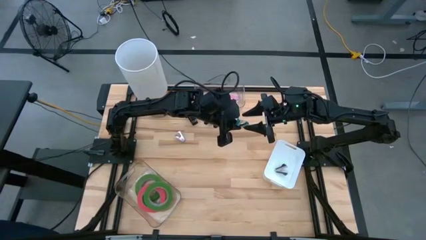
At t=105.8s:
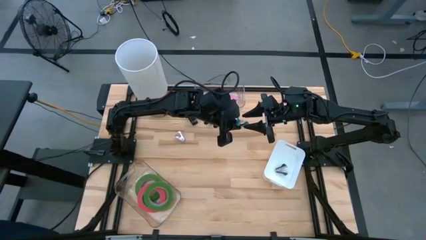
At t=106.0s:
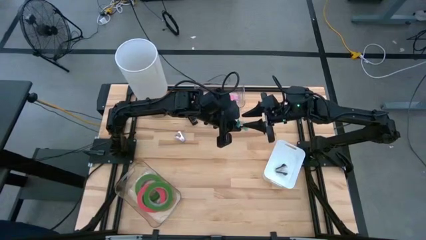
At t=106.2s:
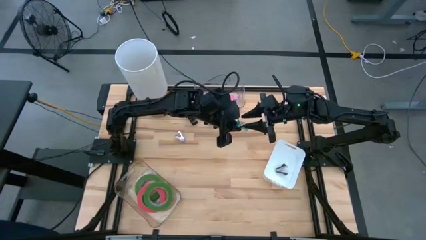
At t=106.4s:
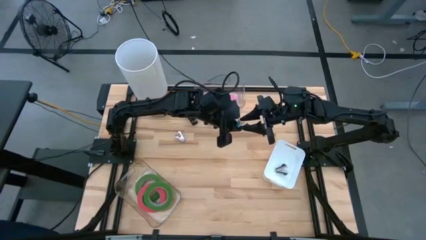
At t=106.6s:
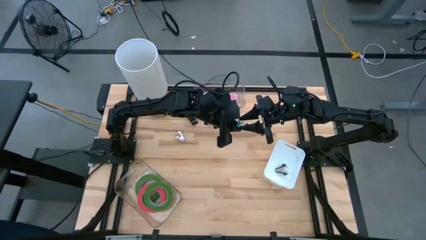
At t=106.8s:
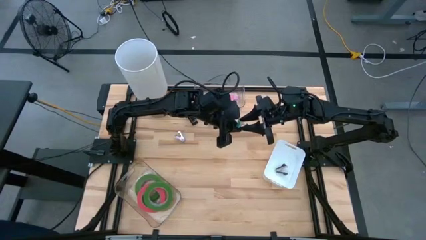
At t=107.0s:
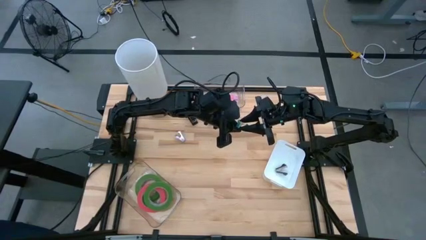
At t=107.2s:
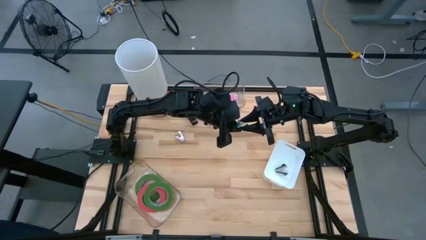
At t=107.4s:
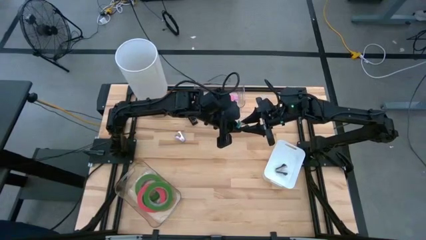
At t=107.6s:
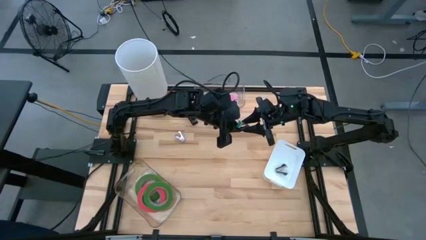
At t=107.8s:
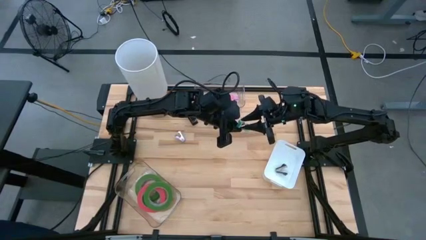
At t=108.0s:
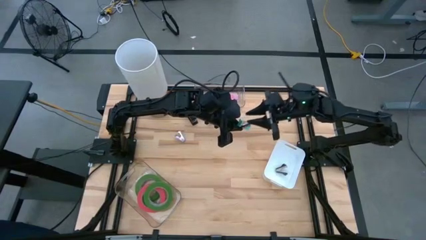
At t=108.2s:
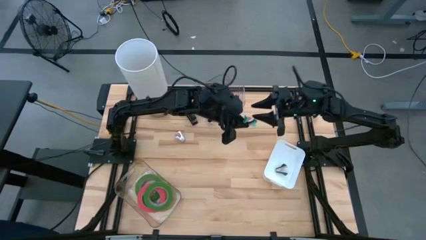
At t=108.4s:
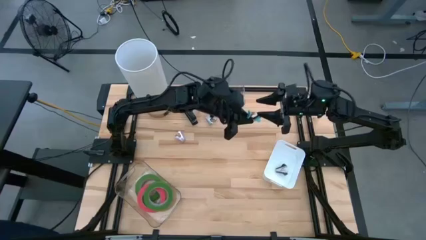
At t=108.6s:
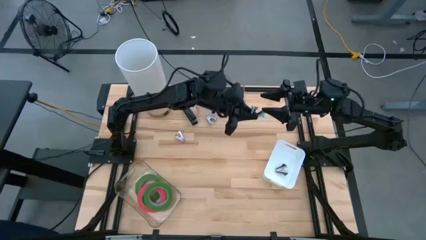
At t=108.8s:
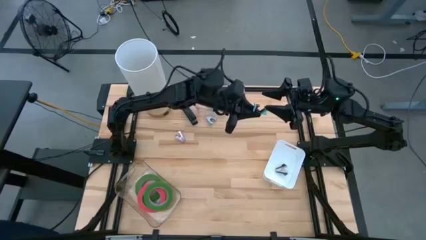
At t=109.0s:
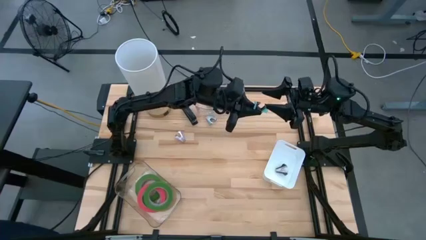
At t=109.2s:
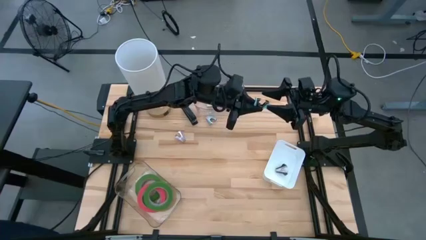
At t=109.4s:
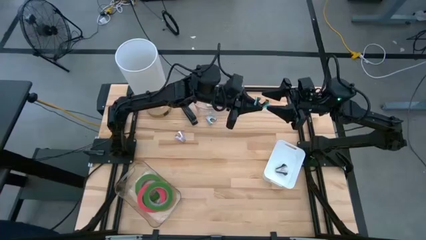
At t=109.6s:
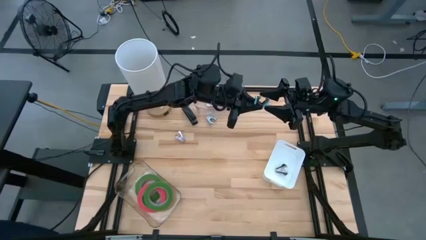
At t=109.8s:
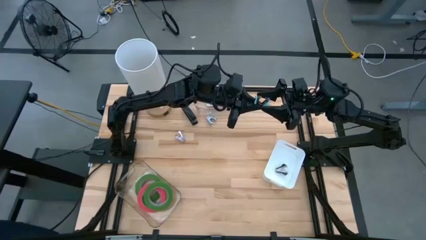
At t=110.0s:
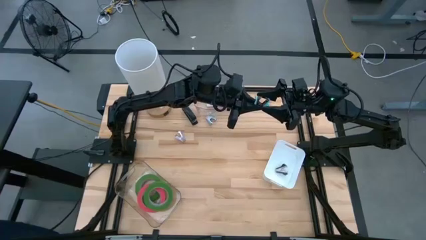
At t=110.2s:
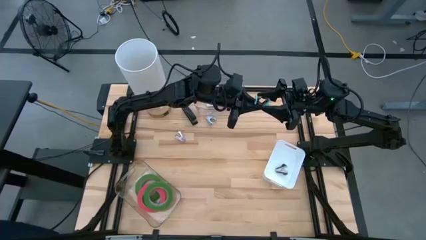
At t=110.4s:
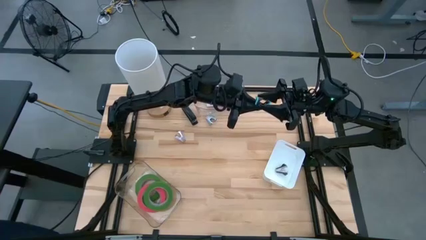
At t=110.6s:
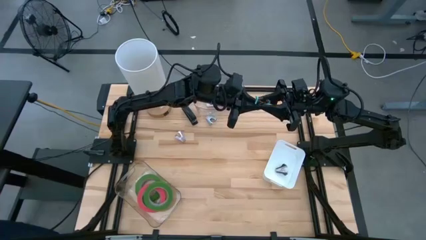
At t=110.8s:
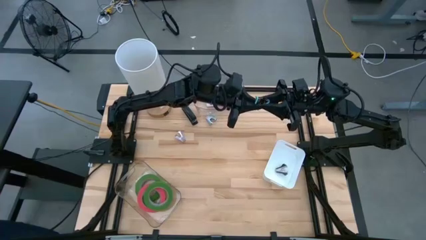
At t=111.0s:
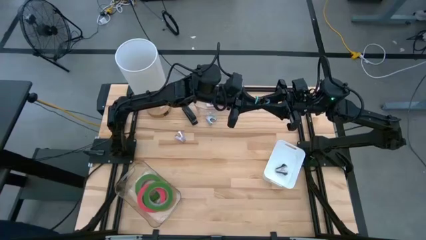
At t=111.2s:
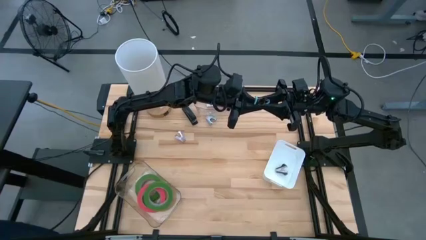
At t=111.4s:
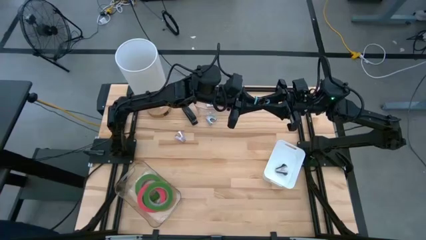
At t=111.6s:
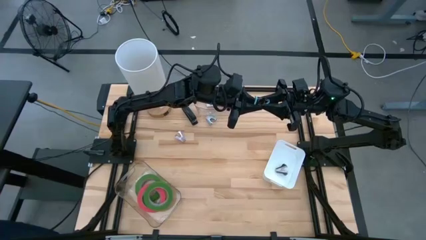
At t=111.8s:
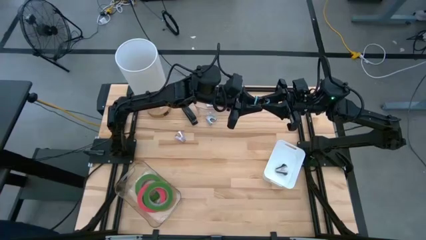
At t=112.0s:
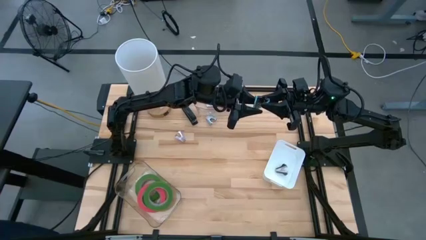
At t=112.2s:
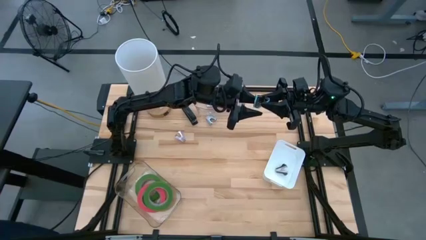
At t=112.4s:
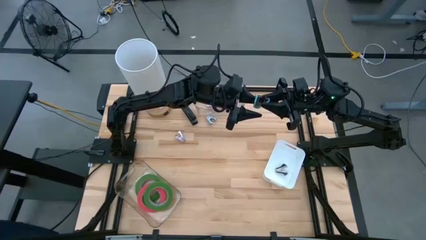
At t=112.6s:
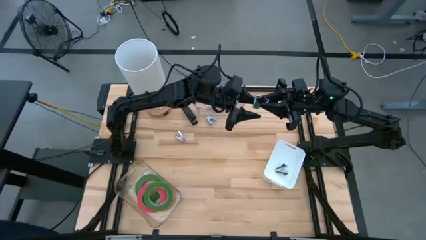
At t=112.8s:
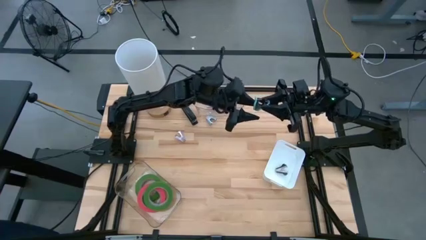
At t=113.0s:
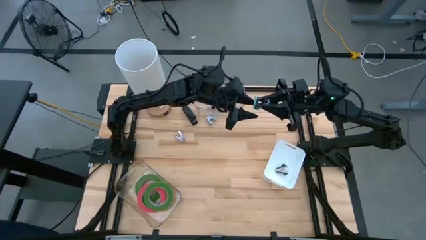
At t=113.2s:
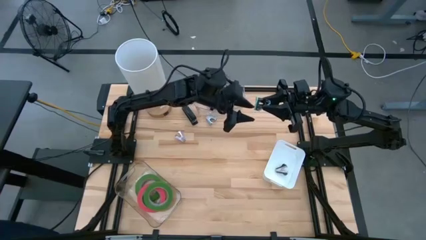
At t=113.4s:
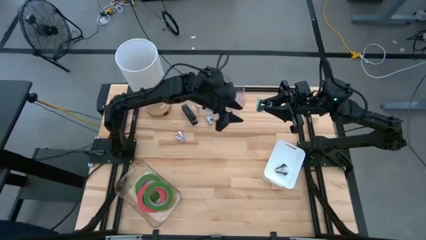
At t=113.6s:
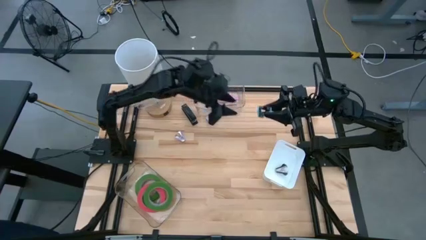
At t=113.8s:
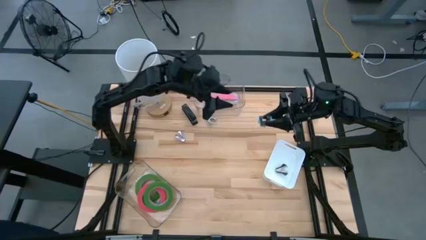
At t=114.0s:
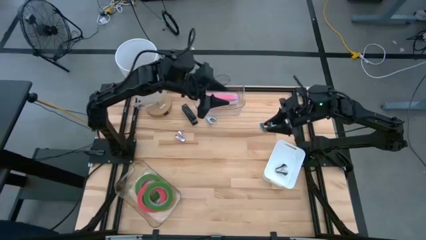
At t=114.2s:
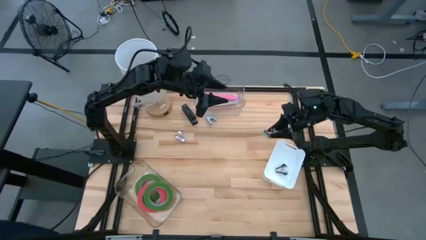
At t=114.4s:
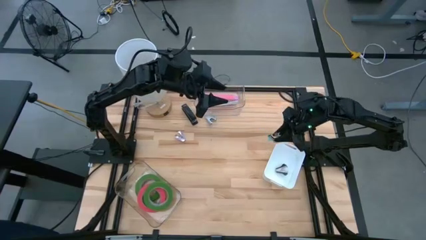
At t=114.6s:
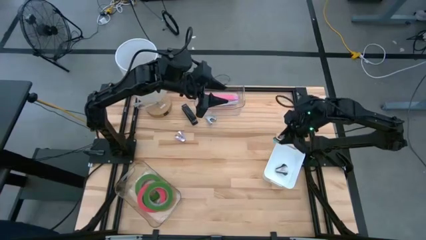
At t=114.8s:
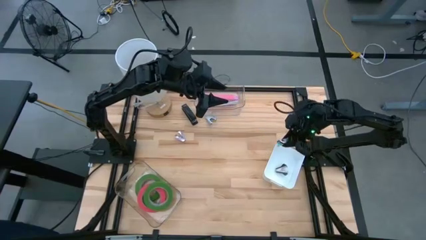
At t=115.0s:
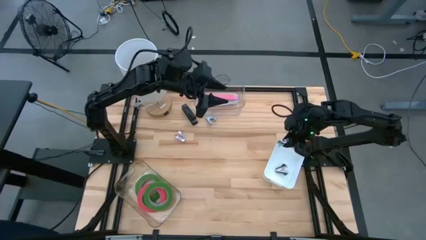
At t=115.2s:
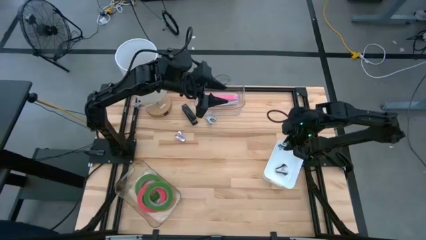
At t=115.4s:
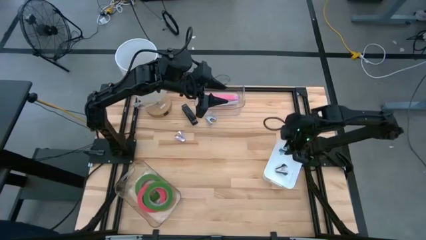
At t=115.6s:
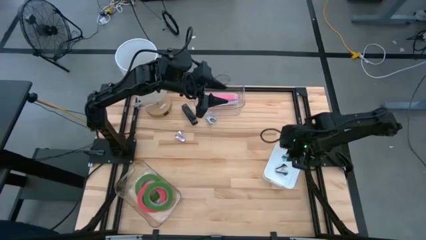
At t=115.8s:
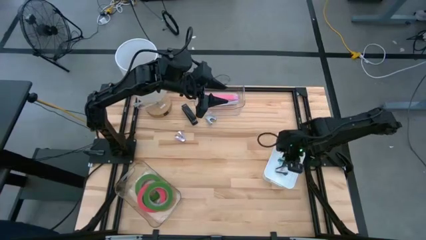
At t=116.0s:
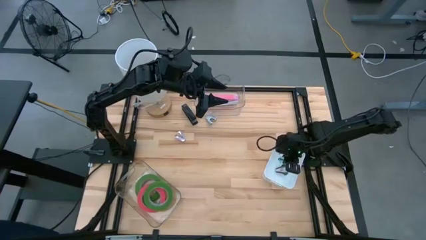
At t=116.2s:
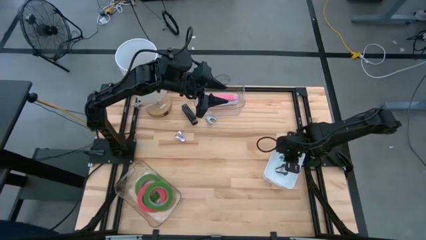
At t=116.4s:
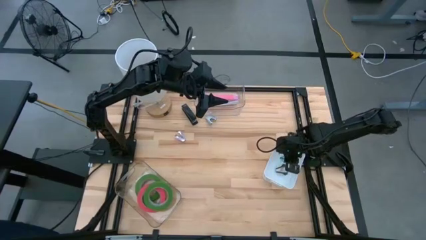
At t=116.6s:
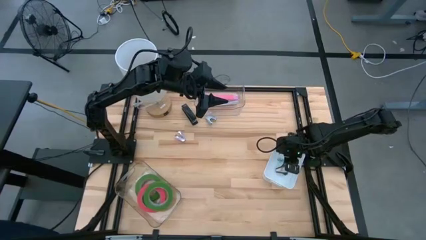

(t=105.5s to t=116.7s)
Task: Pick and place Stapler, Stapler remover, tape
Put the light blue staple remover into the white bin

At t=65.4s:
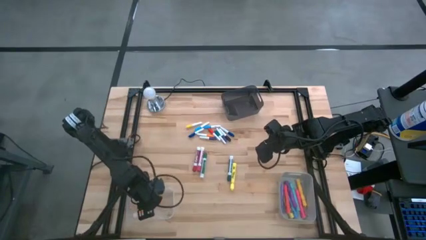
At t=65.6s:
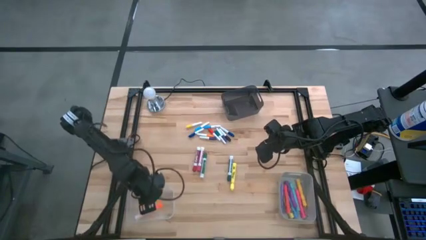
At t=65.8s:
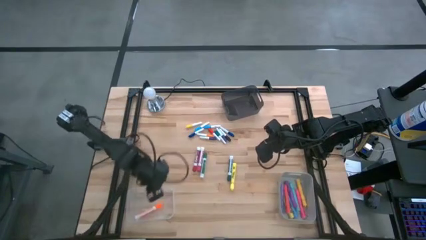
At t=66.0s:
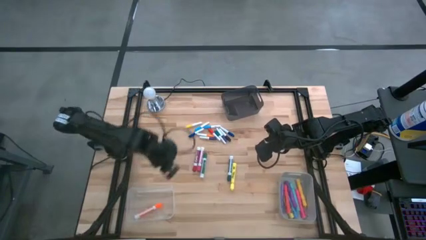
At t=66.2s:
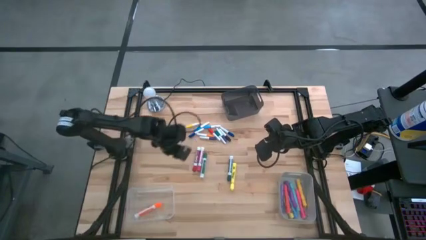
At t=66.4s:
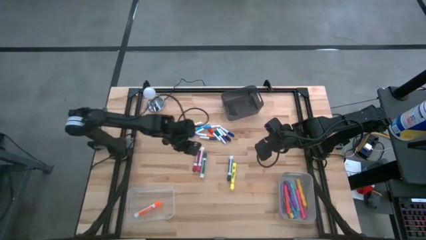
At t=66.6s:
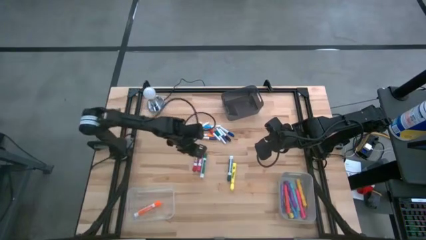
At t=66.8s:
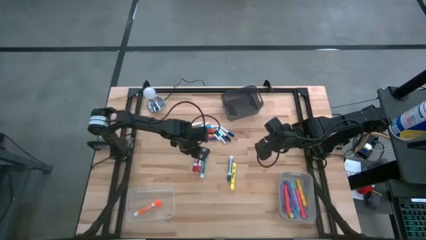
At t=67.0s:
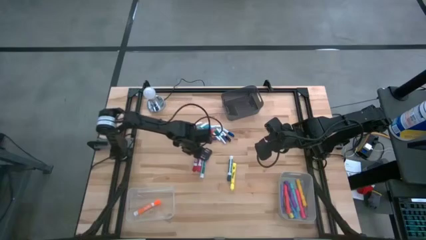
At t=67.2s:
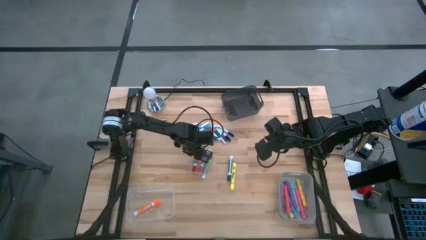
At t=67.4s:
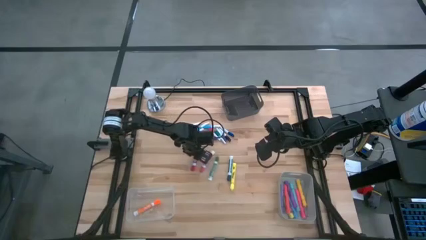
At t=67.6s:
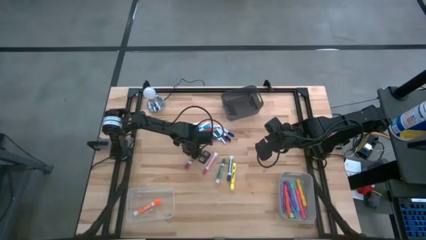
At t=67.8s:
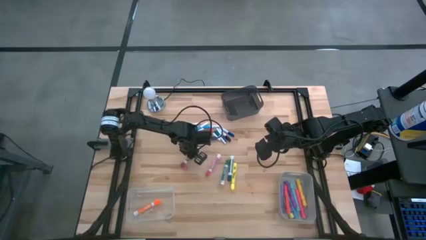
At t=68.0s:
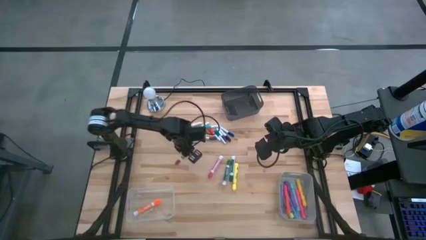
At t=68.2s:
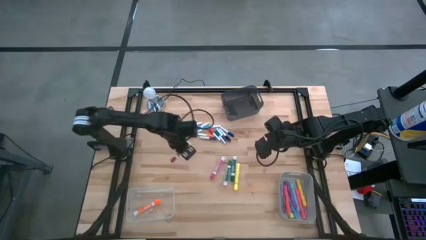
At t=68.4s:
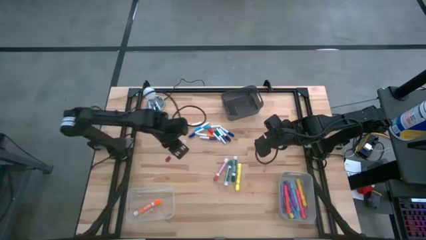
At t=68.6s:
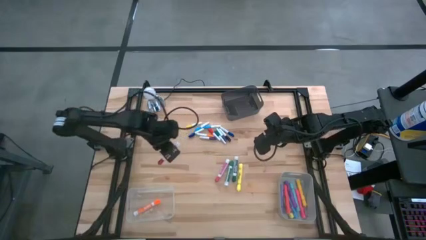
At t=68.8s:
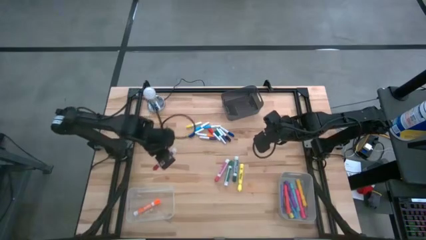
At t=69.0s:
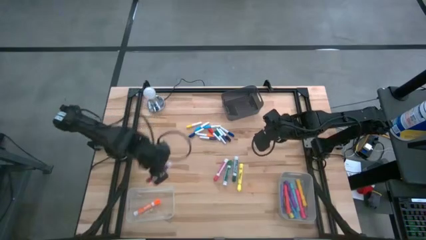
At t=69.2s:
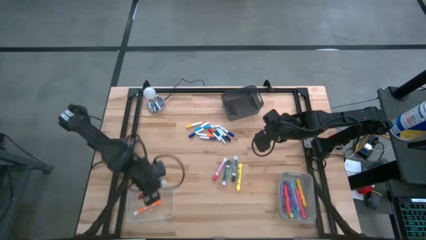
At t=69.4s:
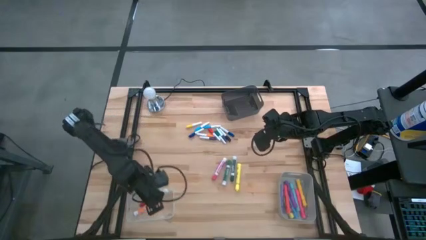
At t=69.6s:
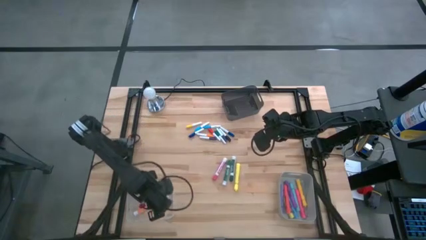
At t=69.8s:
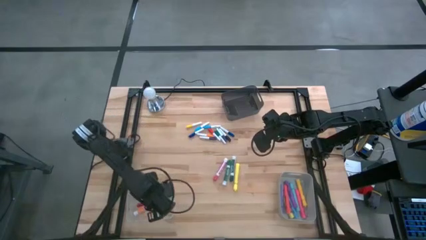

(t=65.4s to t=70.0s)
Task: Pick & Place Markers
Put the red marker pen into the transparent bin
